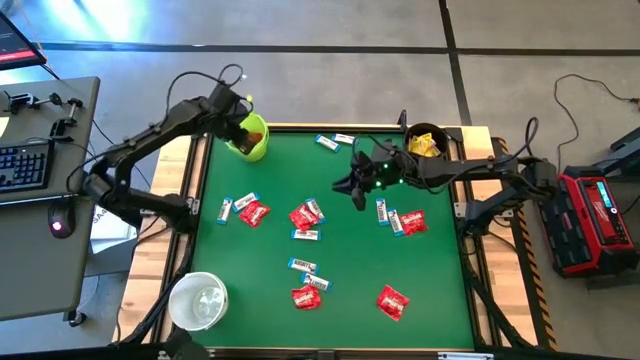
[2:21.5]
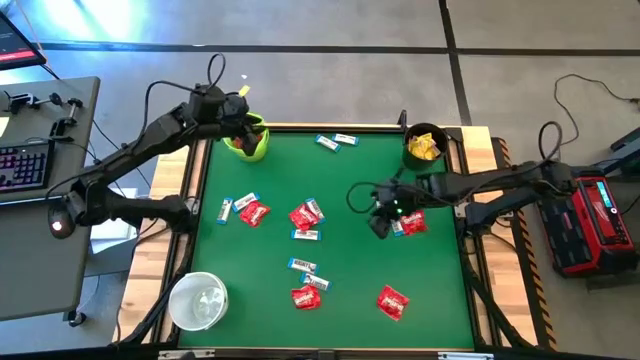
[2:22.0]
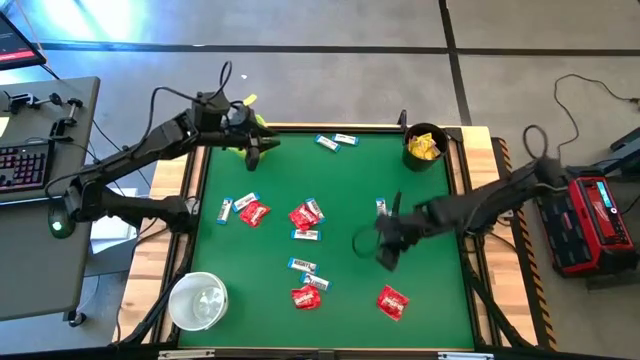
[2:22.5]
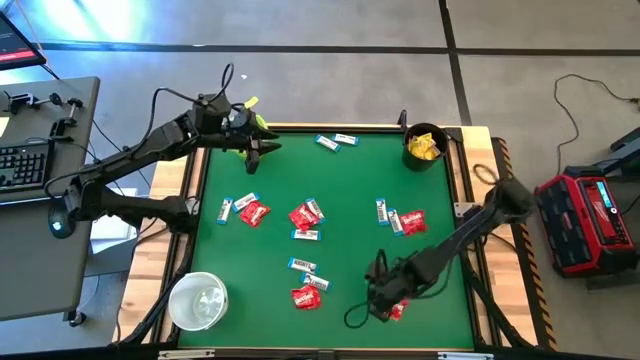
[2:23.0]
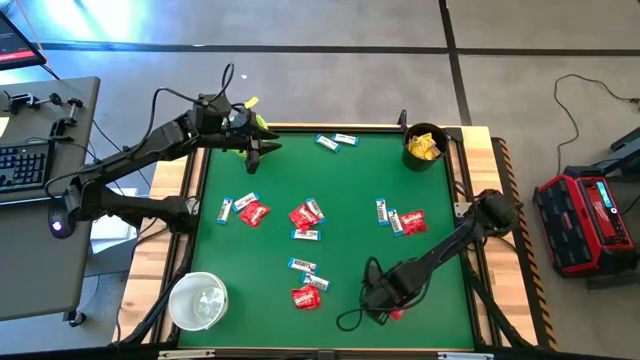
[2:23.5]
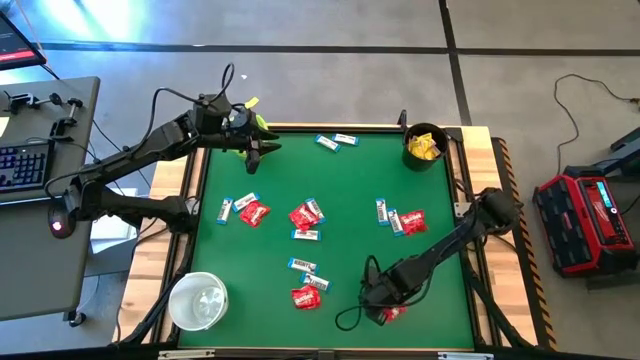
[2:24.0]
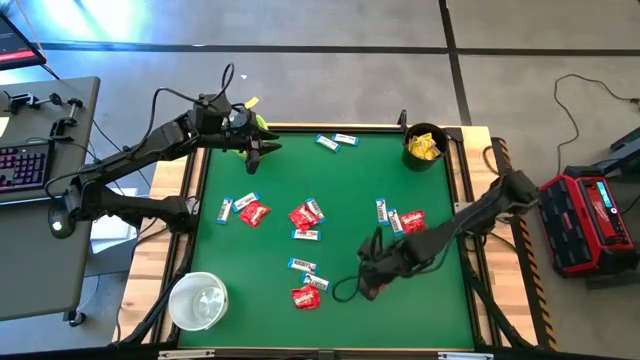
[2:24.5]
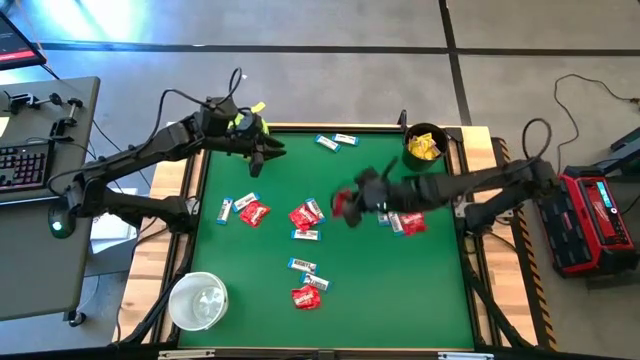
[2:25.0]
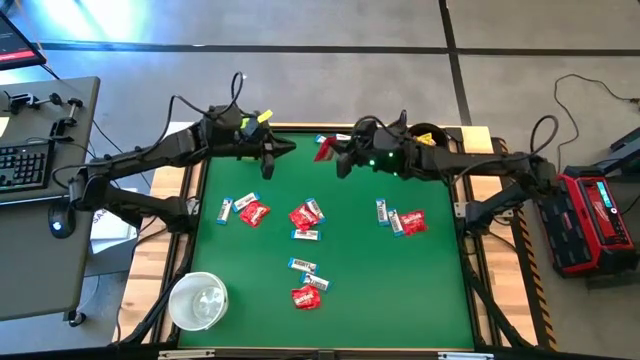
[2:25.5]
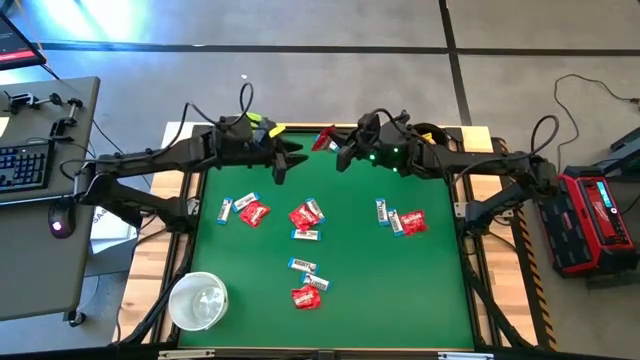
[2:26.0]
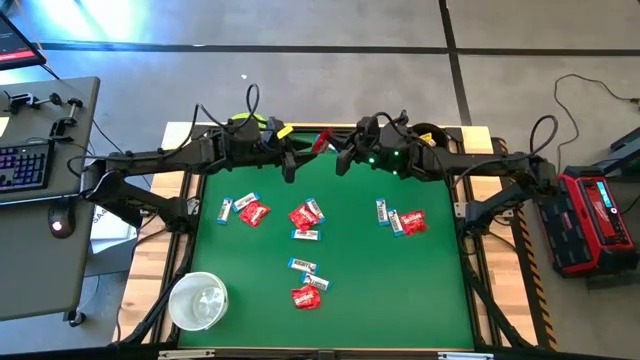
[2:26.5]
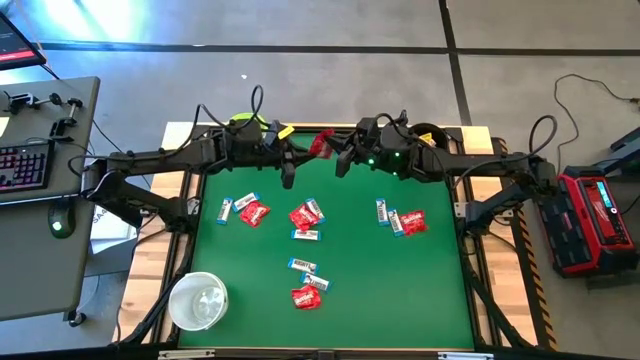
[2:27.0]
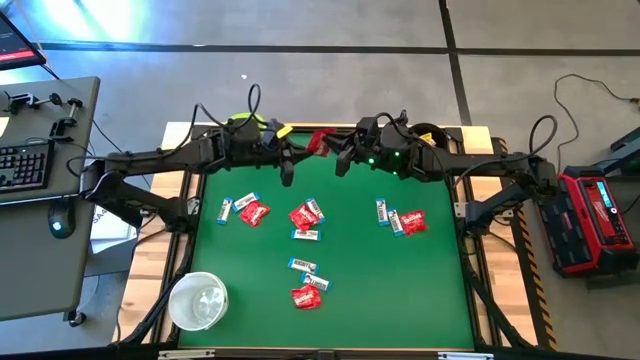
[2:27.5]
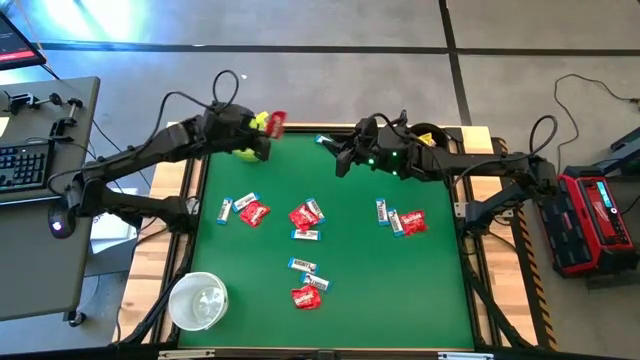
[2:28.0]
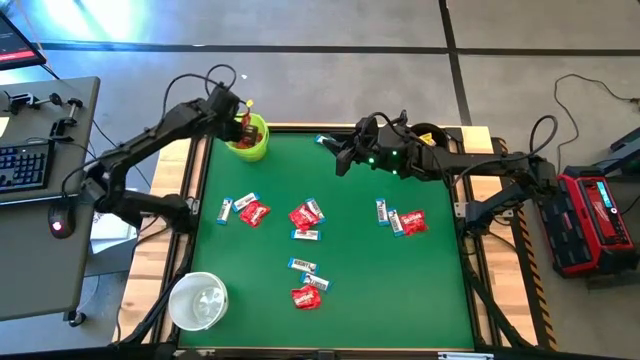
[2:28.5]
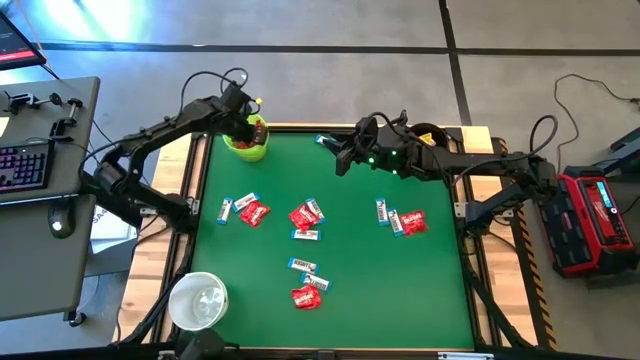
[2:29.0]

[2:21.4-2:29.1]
Task: Sort candy by brand, put in halloween buckets
Put the red candy into the green bucket

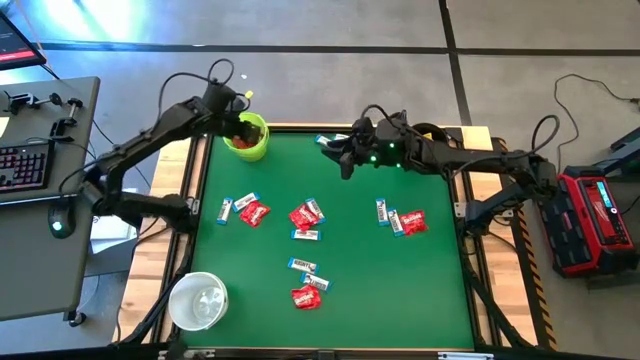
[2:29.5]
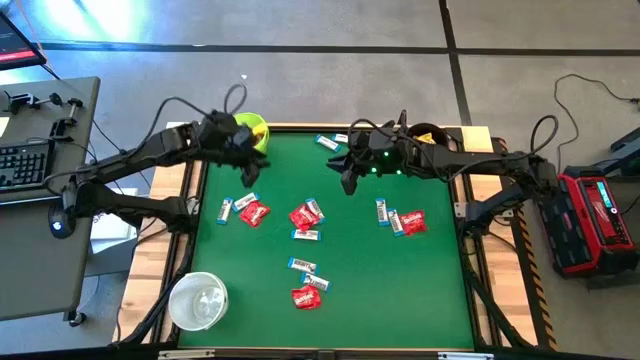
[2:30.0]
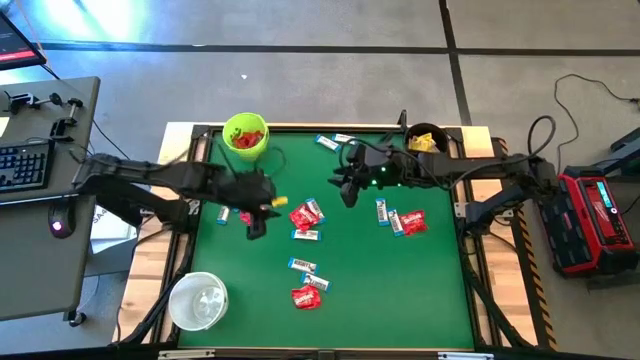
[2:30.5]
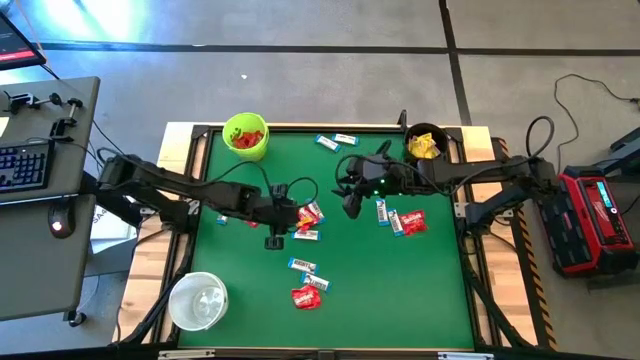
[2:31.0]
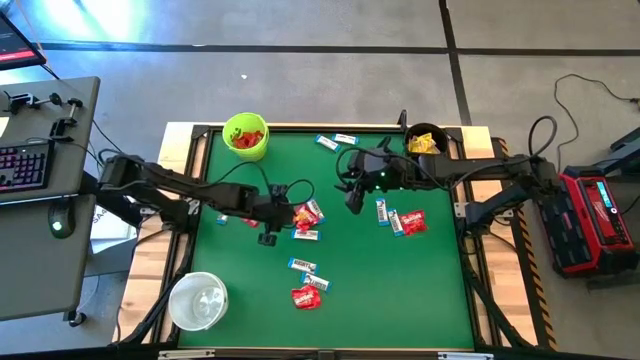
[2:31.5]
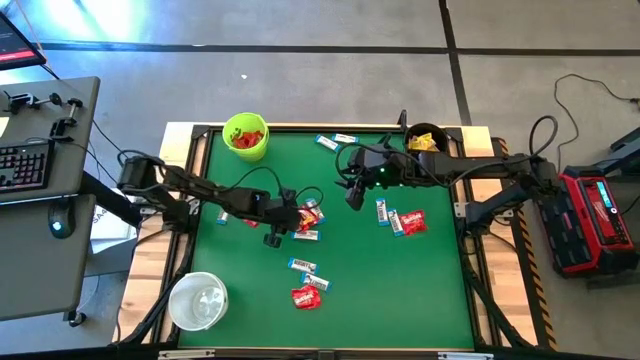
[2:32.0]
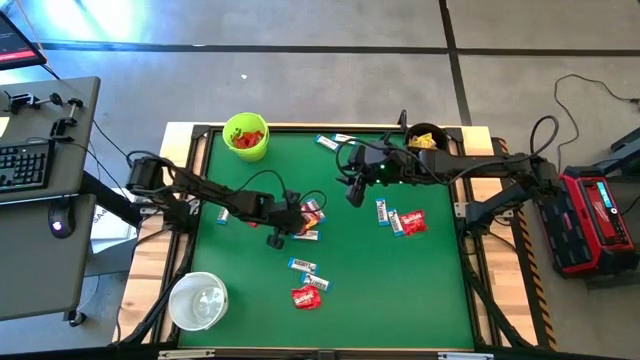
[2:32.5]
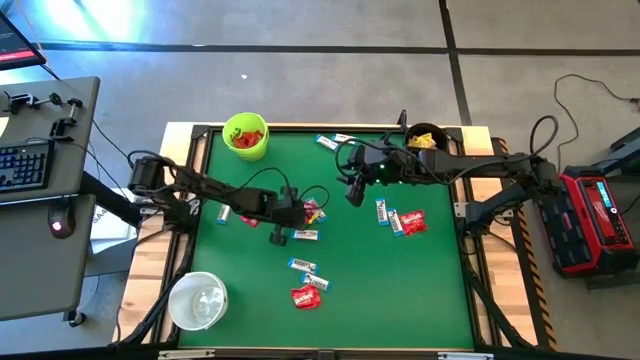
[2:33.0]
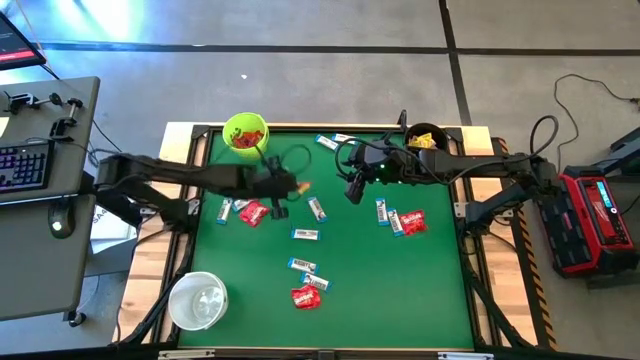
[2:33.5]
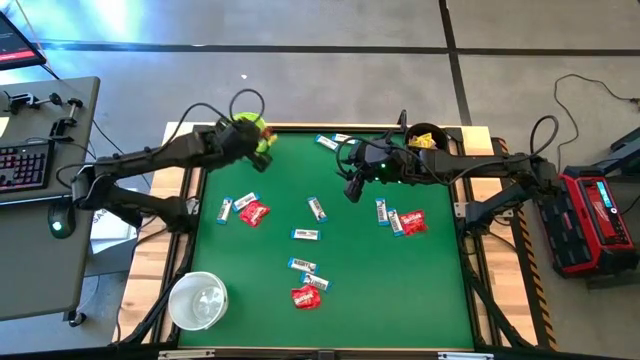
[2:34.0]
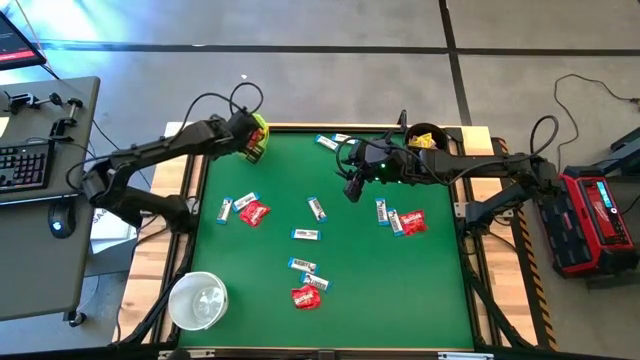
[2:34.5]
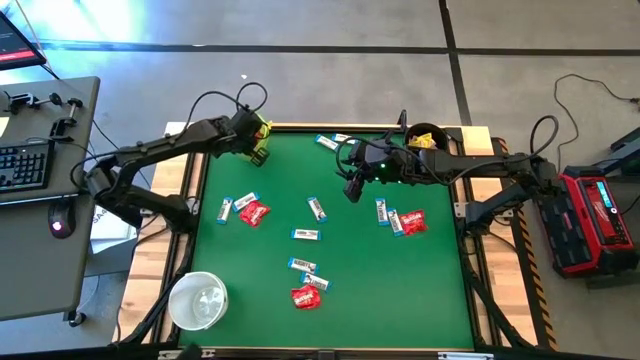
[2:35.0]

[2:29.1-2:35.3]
Put the red candy into the green bucket

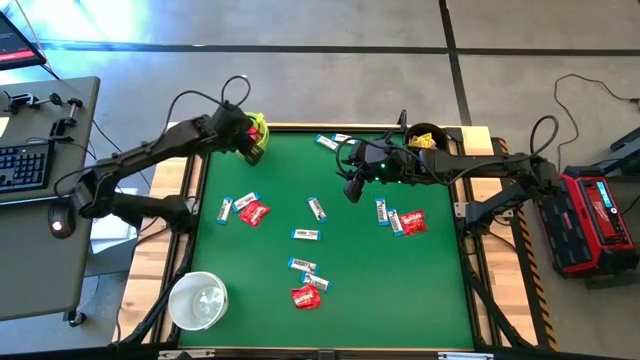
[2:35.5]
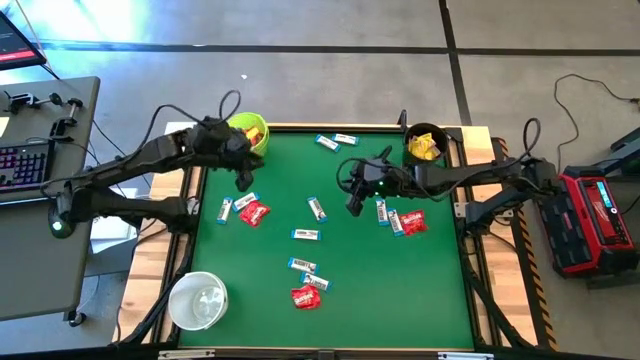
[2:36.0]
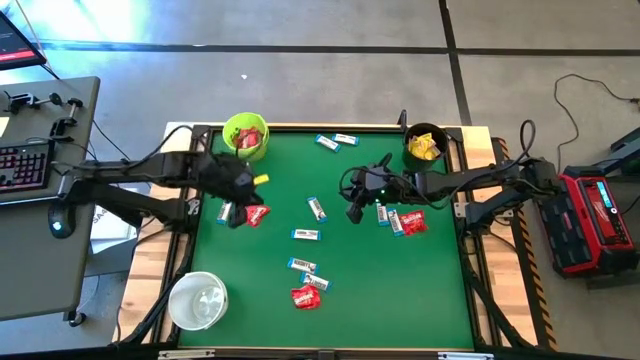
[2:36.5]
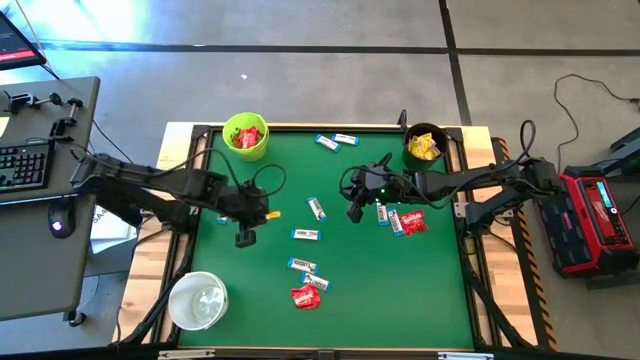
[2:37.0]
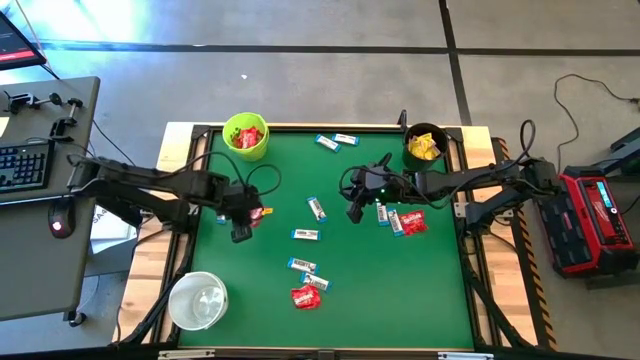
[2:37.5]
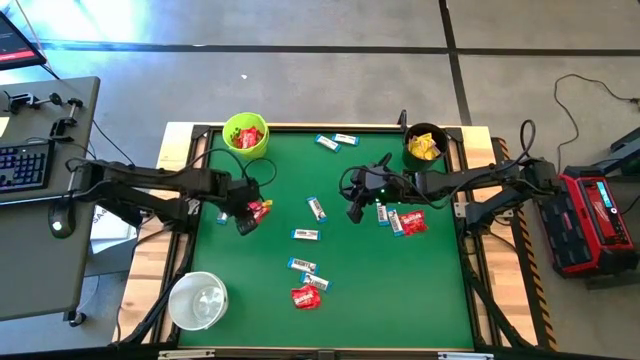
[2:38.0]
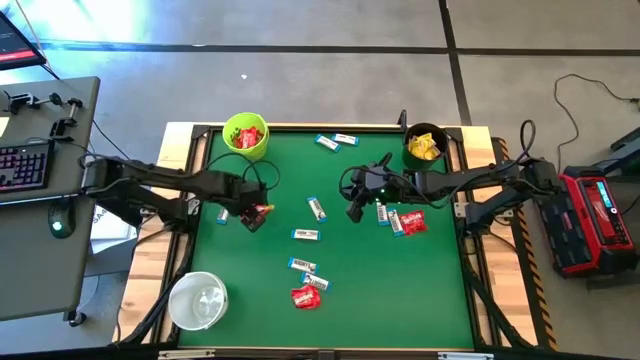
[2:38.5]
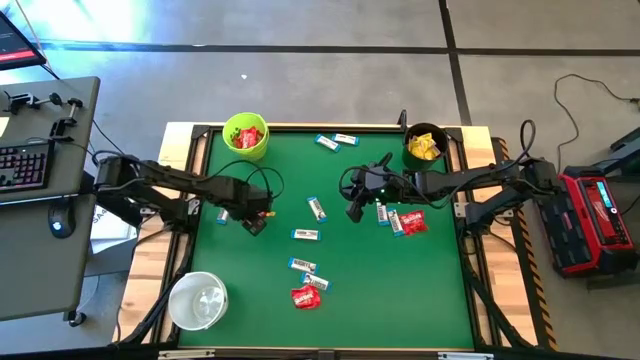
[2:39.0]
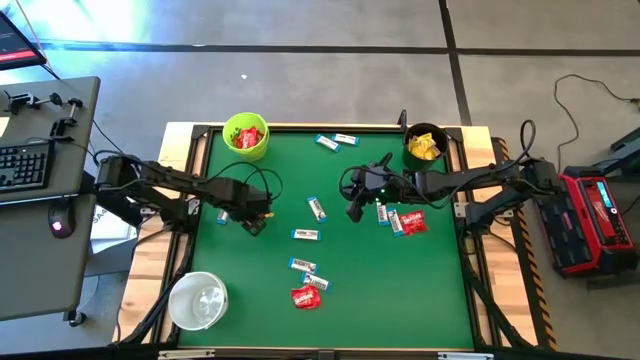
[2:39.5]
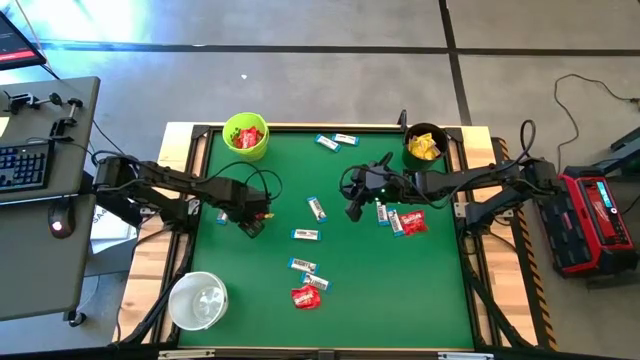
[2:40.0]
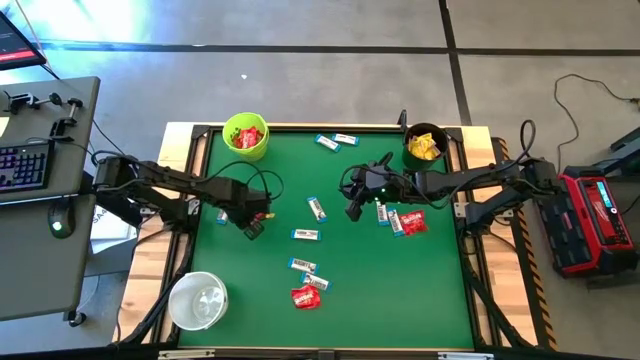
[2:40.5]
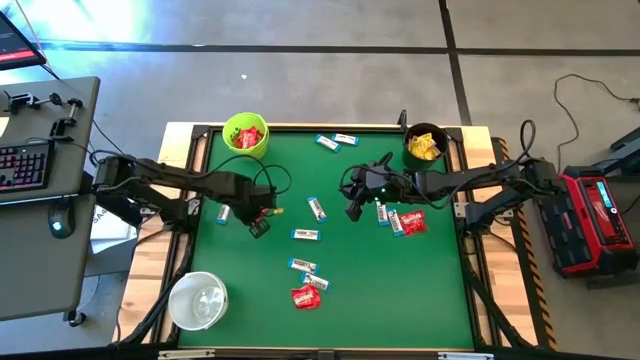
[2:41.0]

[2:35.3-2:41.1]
Put the red candy into the green bucket

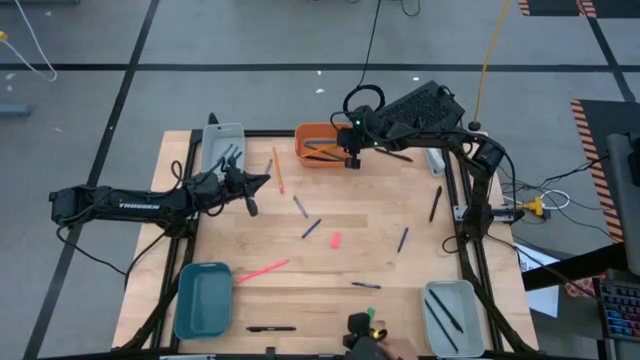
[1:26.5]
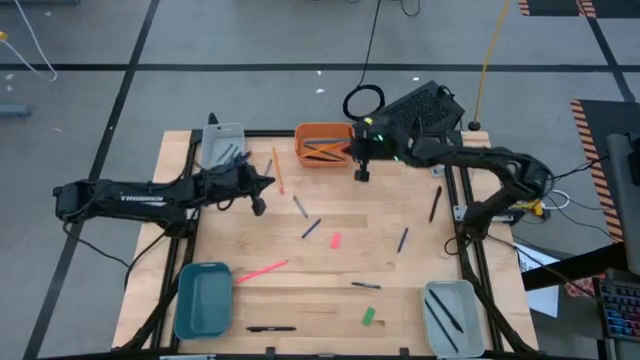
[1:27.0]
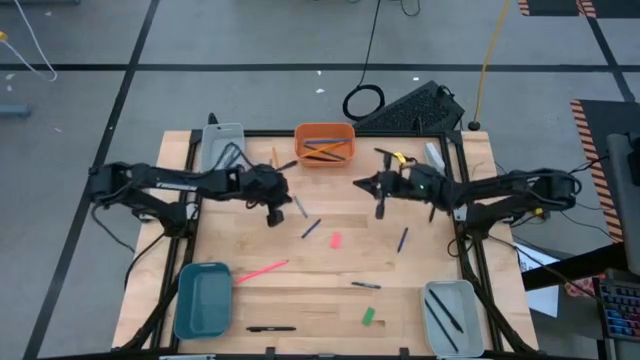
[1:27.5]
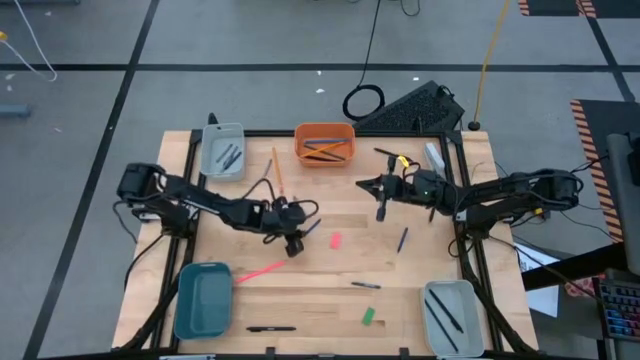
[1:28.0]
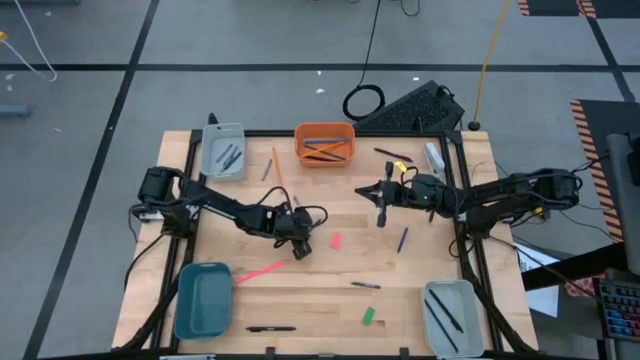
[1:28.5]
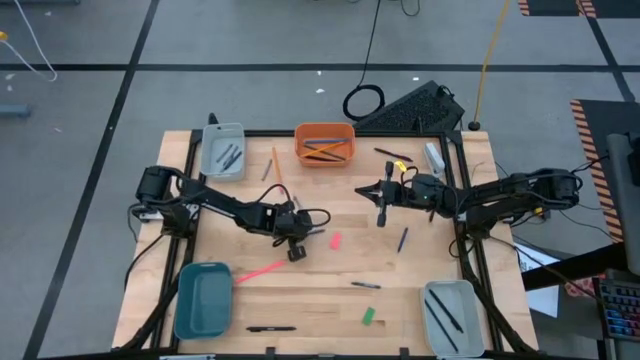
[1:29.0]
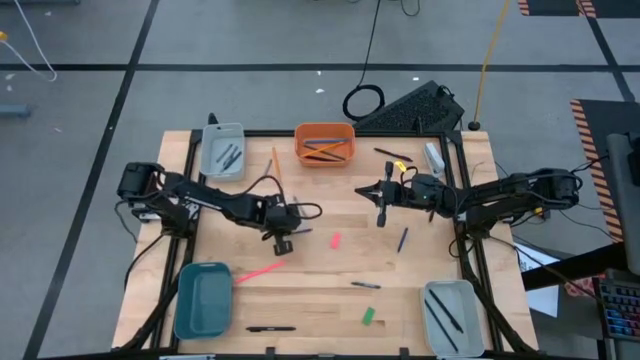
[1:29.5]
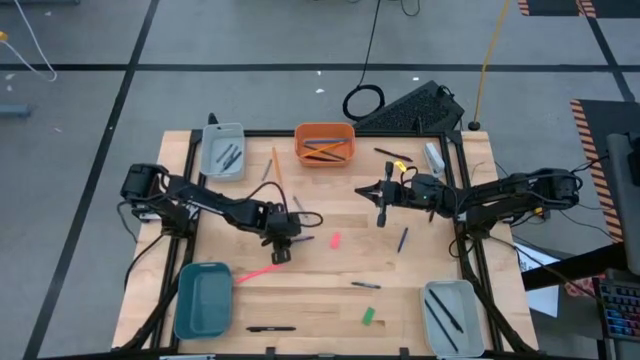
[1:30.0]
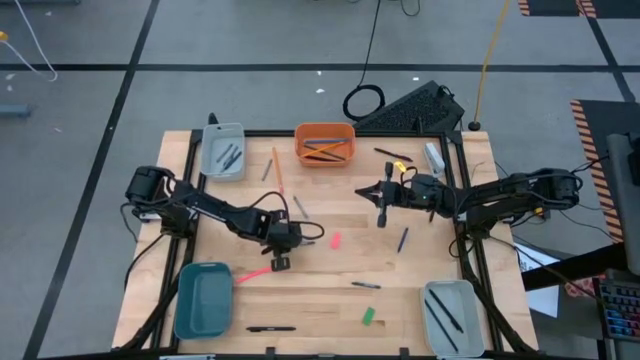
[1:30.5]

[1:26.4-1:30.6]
Task: Sort crayons/erasers/pens/pencils in bins
Put the blue crayon into the top gray bin
